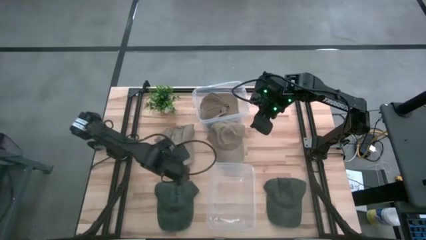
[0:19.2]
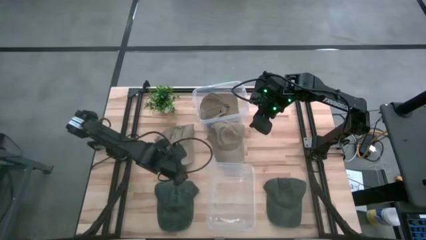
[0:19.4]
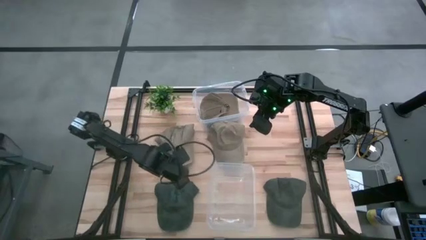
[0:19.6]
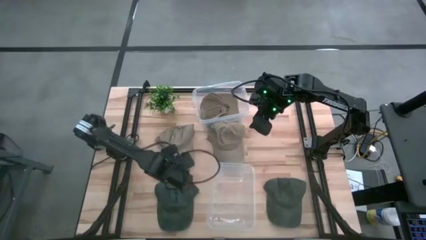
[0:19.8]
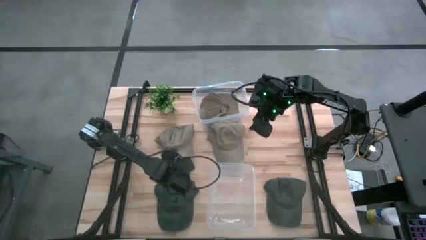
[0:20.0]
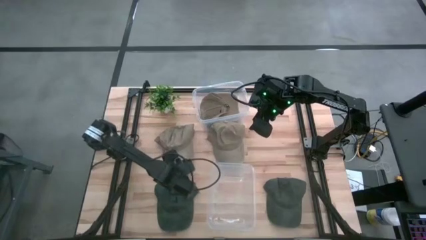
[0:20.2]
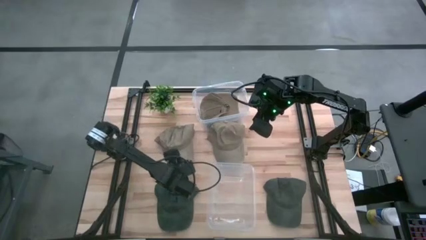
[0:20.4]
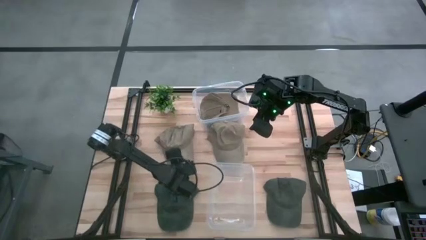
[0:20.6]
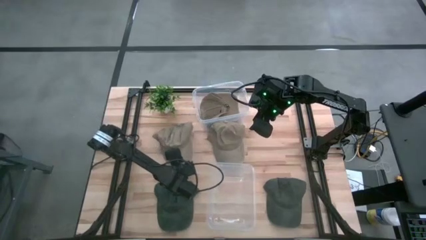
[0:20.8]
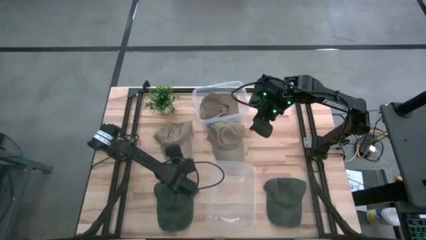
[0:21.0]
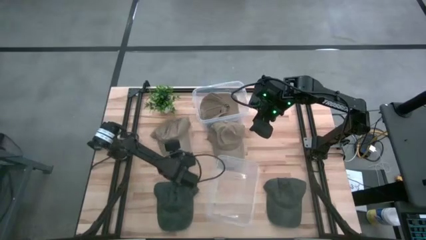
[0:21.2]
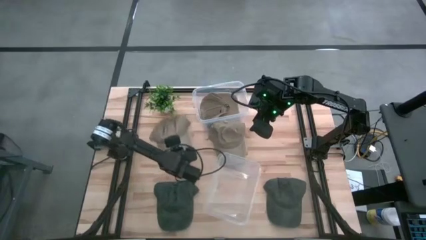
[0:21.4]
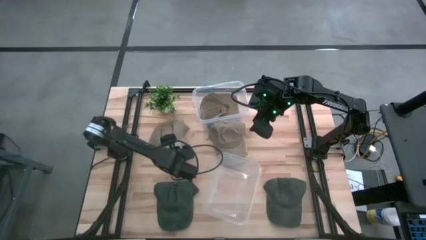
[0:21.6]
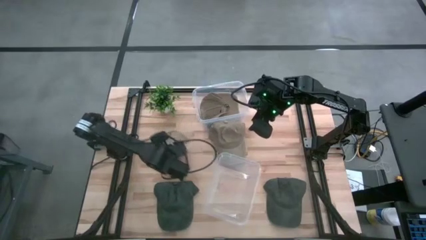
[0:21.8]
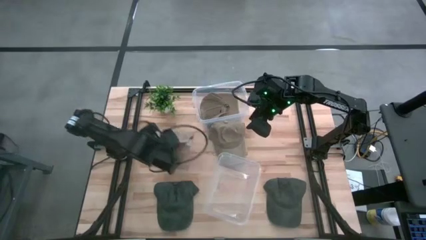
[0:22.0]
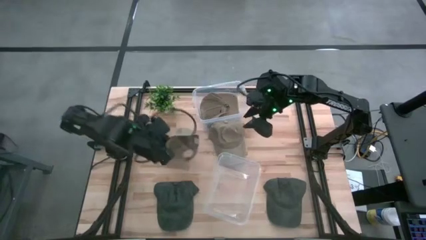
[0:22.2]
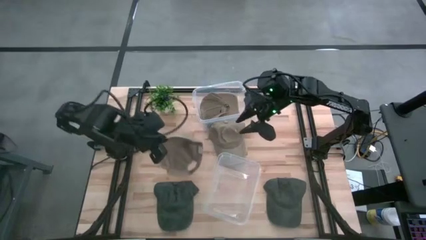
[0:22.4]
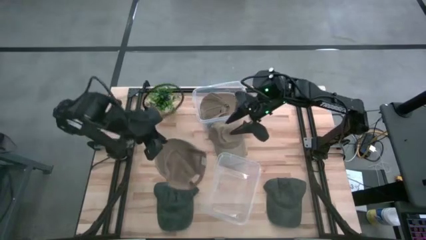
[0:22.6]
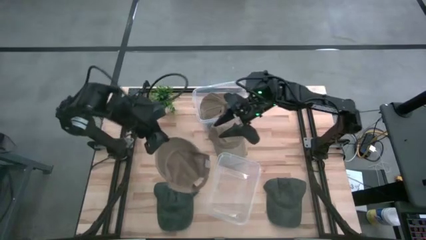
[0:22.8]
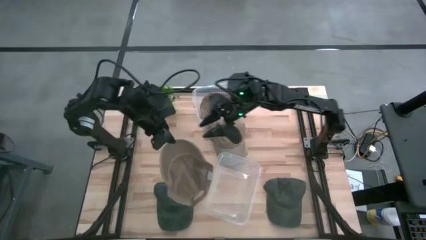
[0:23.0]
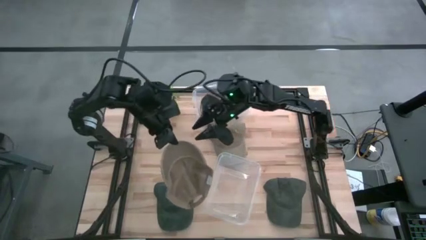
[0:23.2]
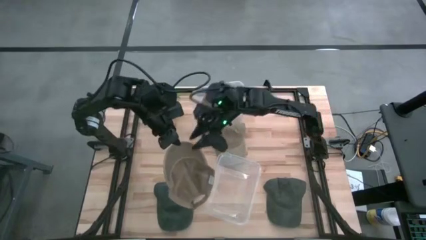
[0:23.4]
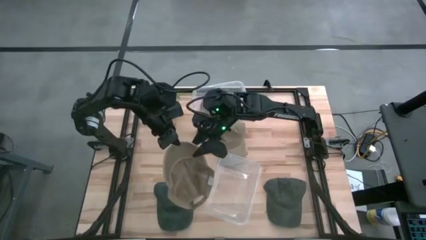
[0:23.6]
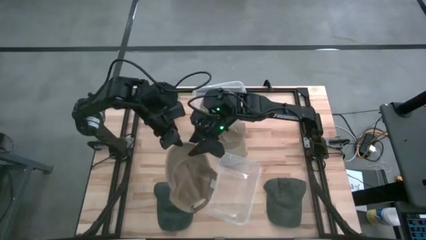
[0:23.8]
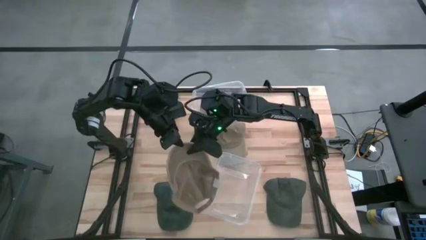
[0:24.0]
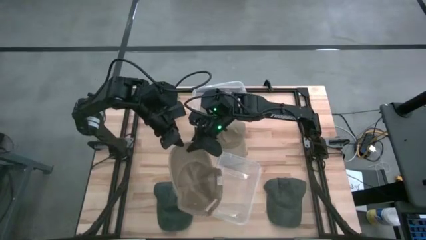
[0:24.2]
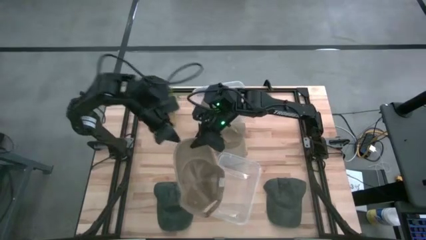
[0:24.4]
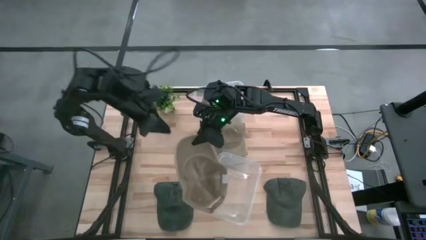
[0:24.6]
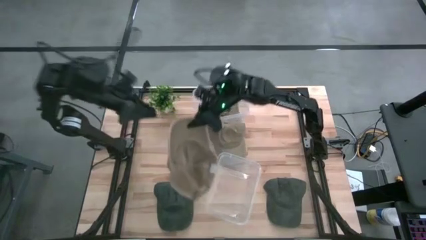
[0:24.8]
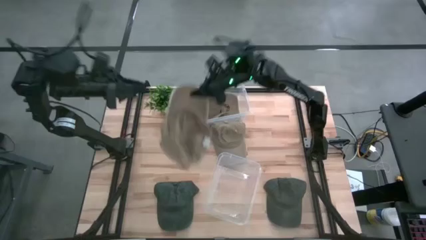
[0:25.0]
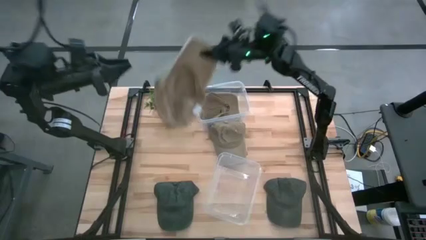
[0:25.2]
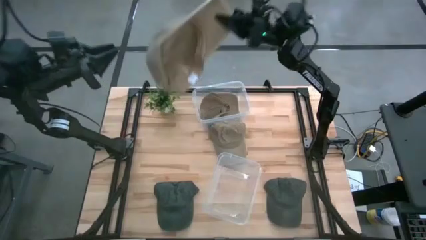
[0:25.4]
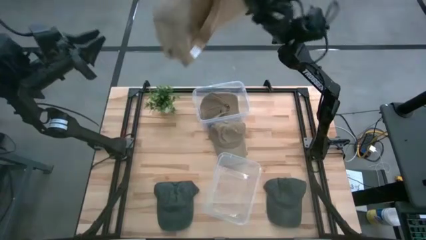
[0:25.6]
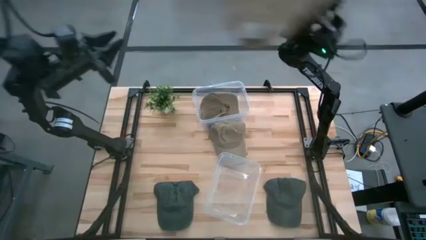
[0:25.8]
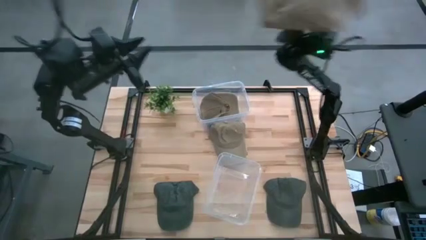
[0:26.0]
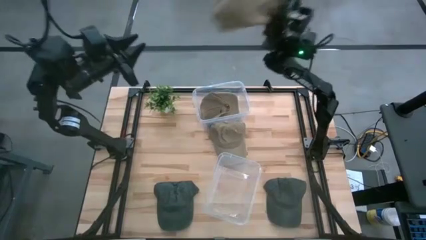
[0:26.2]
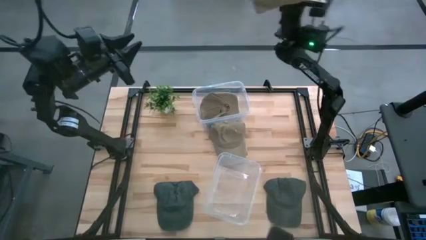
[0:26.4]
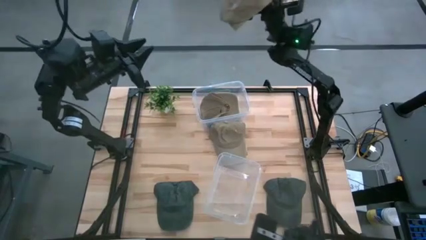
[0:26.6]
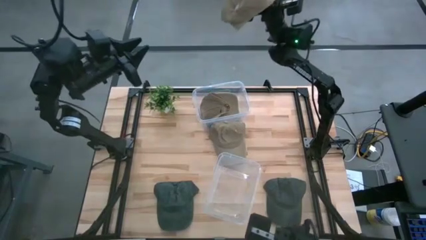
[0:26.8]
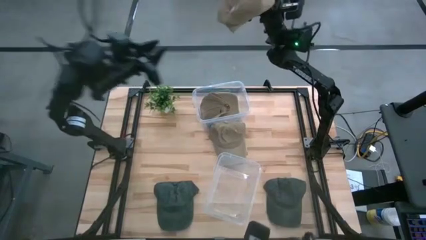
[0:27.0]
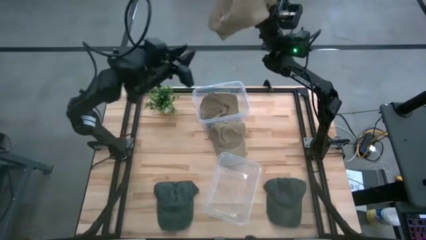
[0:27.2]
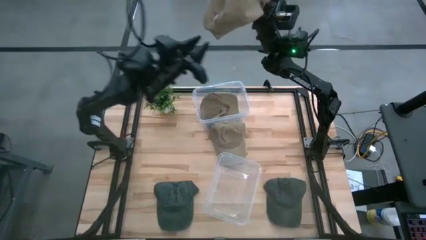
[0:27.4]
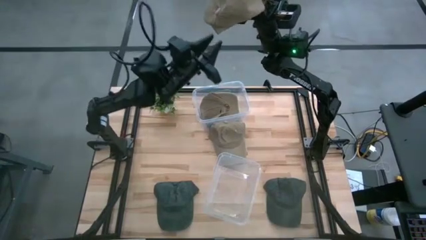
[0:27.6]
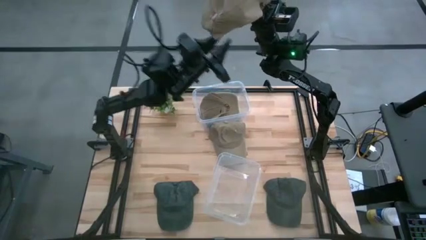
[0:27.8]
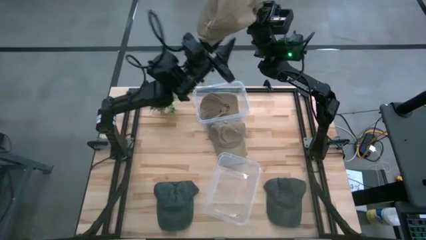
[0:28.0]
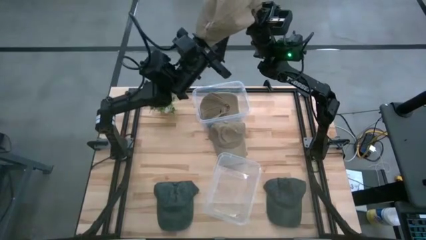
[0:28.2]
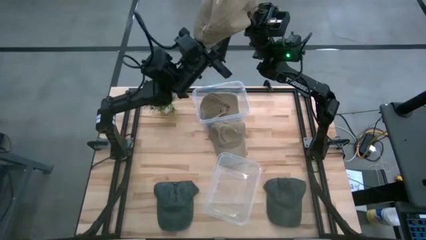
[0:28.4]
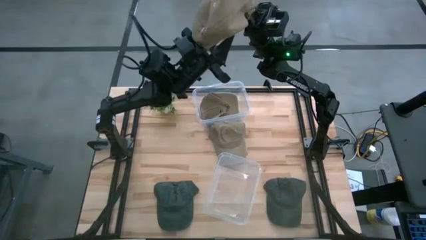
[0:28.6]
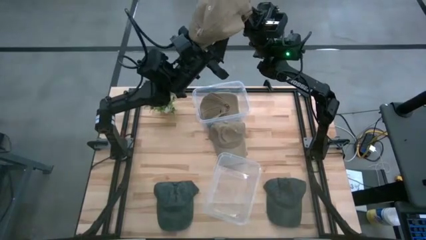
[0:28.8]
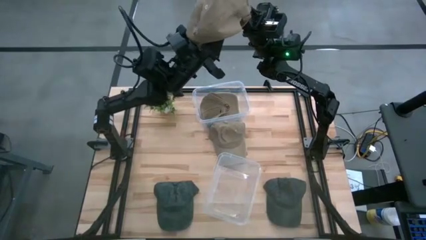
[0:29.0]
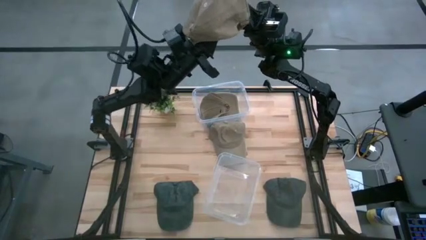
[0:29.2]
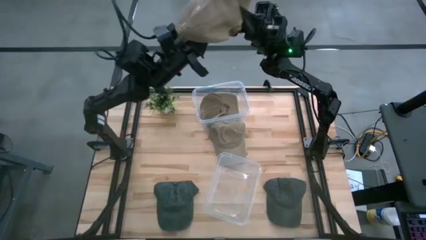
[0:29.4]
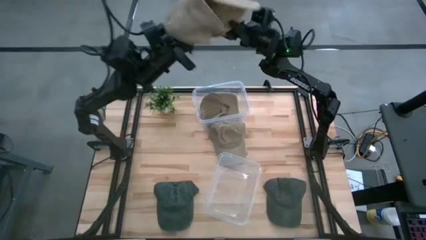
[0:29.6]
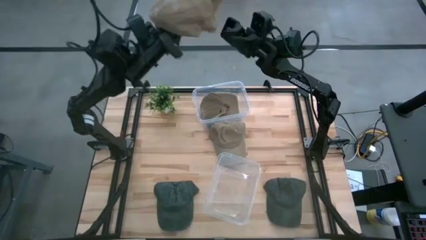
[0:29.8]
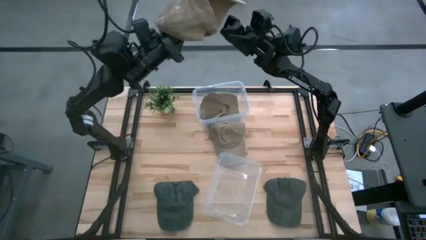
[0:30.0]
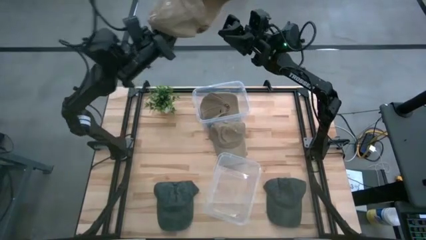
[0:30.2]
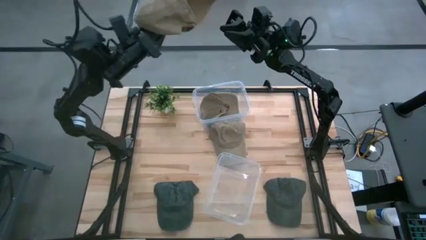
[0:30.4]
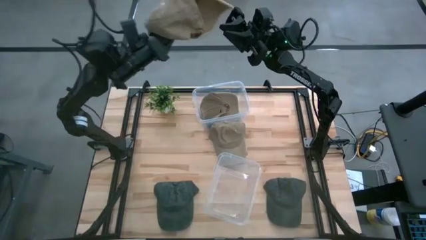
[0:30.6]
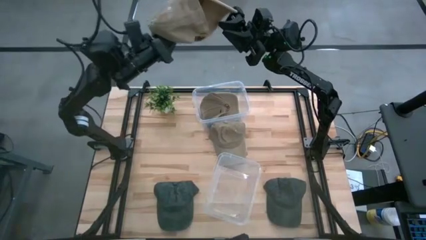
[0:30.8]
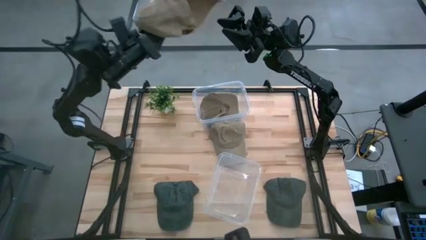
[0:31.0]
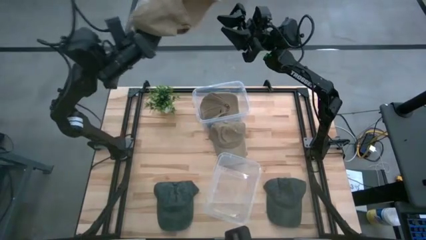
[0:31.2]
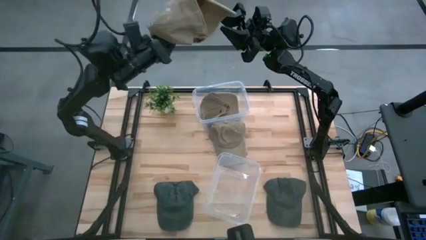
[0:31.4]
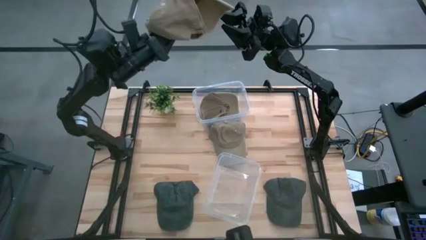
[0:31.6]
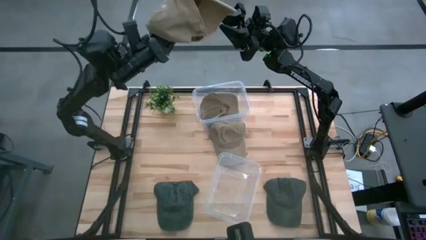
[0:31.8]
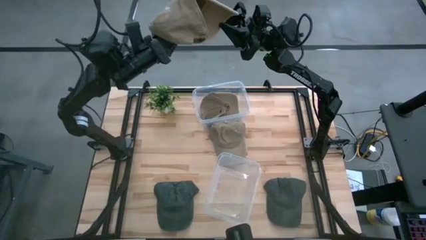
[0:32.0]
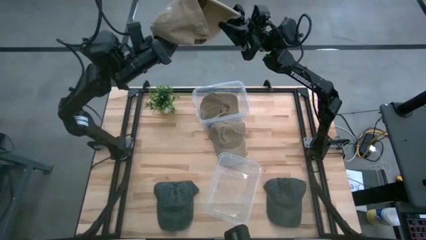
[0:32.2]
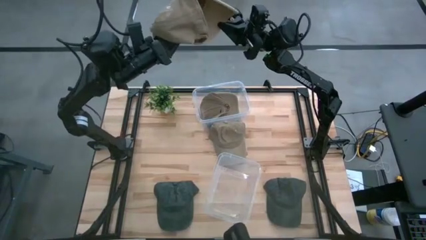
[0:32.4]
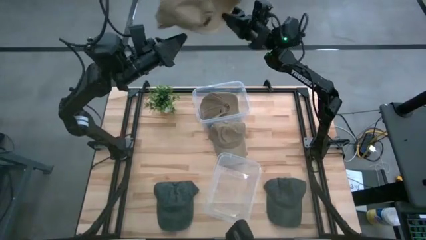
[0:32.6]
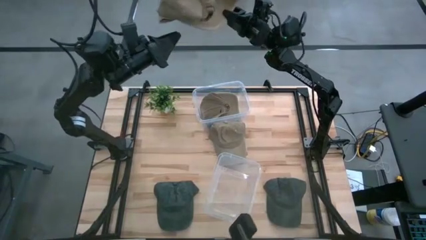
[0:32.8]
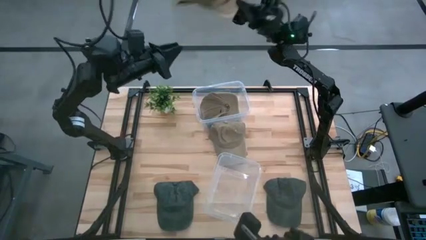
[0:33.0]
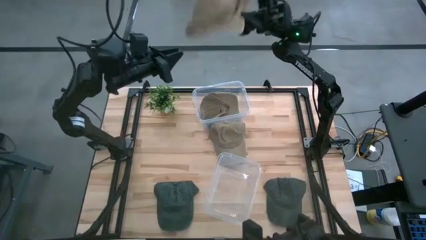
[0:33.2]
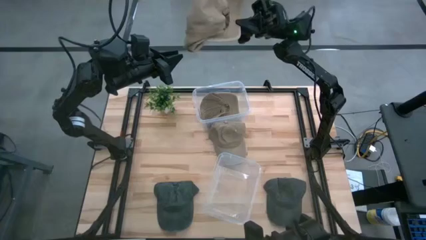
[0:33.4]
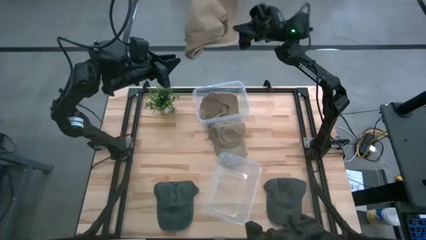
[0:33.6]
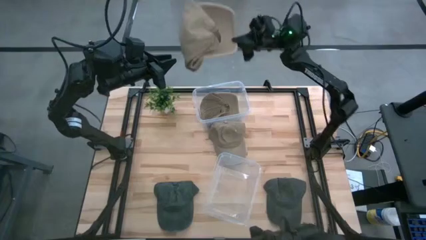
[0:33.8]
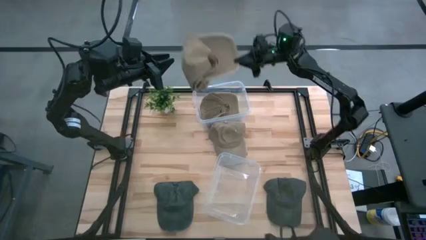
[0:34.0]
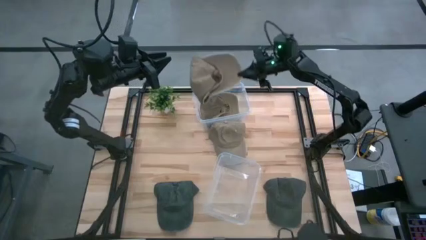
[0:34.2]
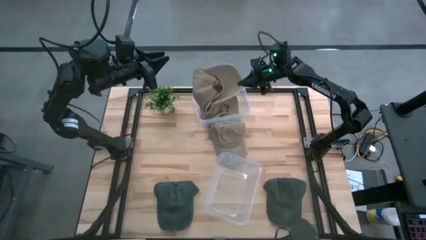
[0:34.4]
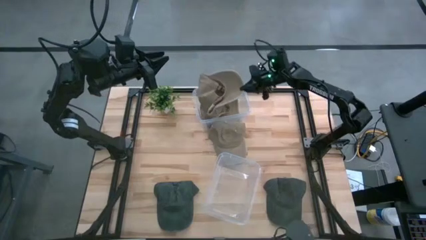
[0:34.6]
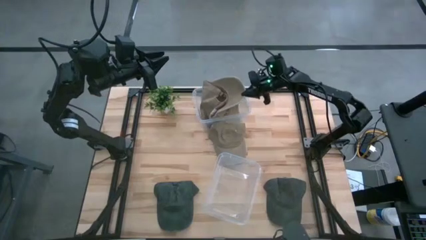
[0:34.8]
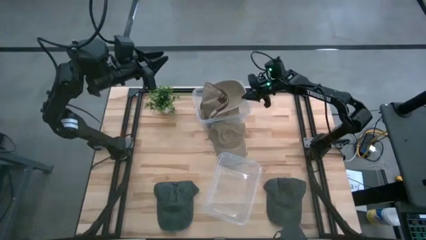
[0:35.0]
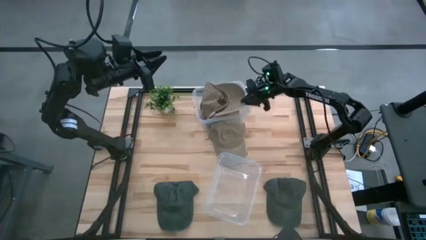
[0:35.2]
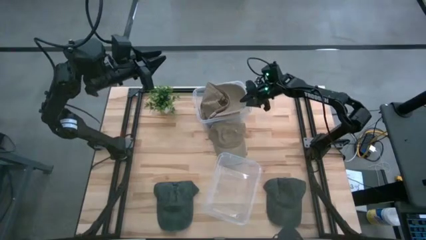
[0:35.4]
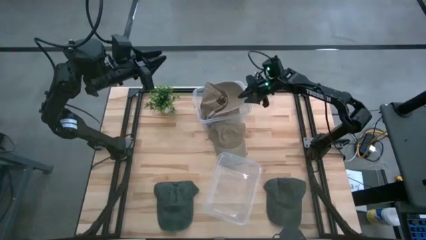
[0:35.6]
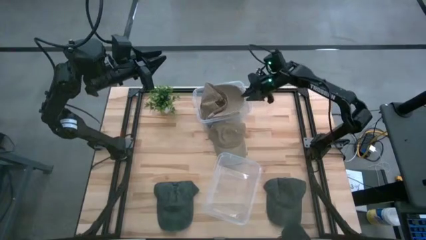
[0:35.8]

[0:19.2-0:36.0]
Task: Pick & Place hat
Put the left brown cap into the top transparent container
